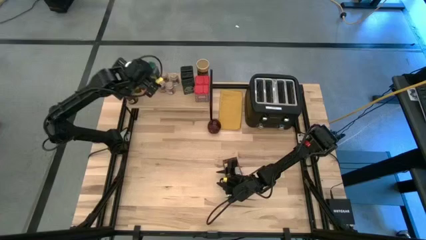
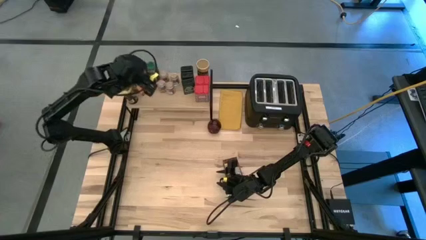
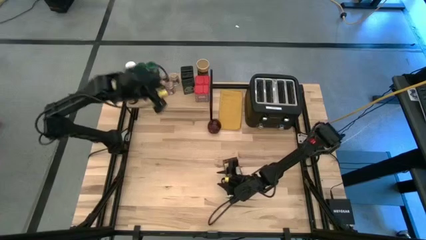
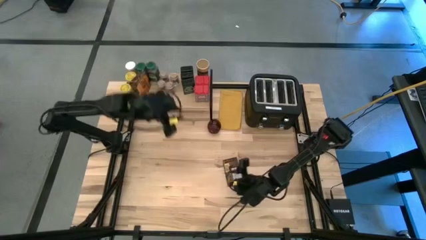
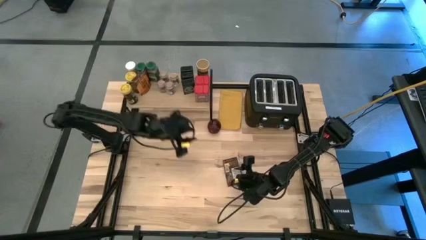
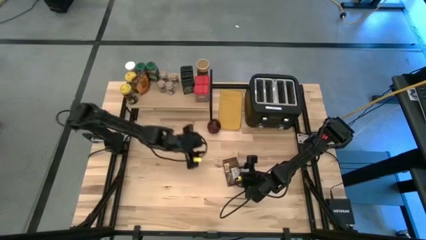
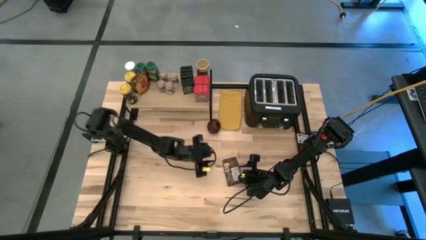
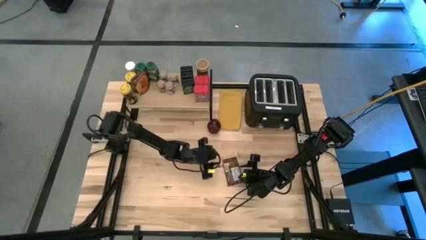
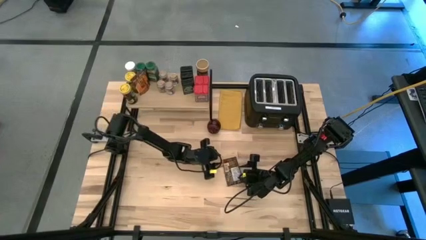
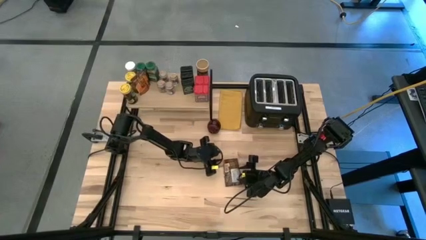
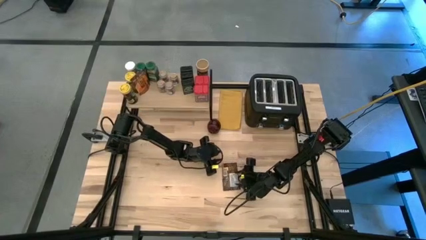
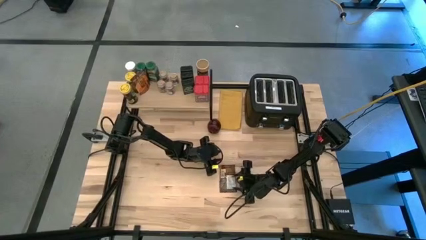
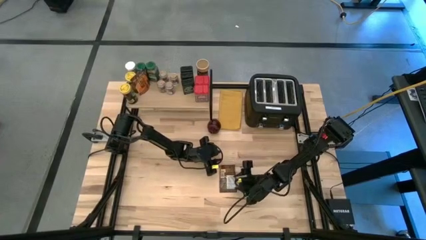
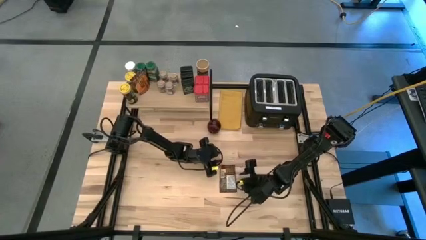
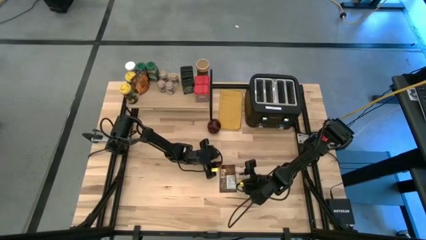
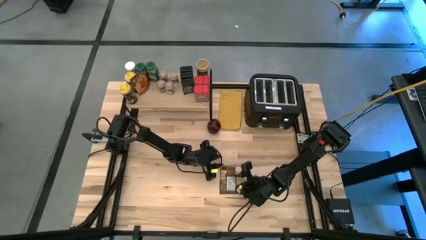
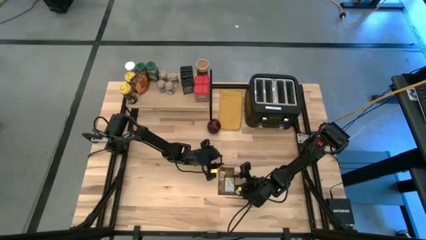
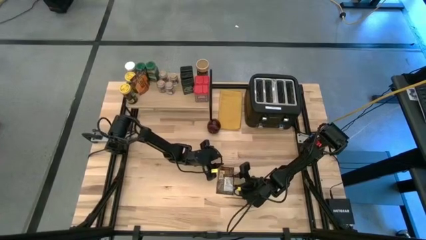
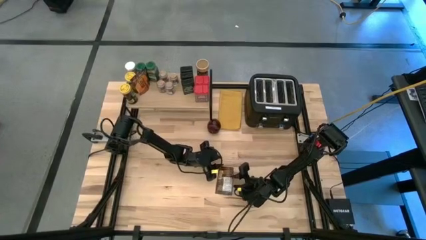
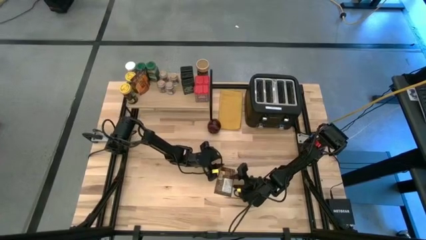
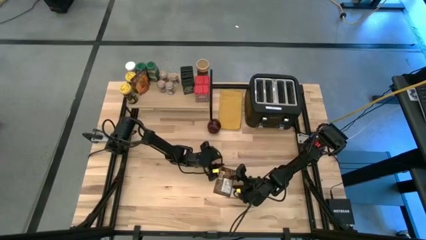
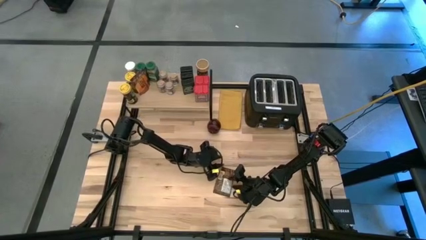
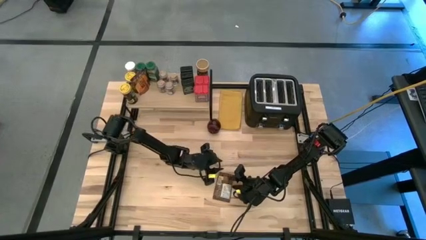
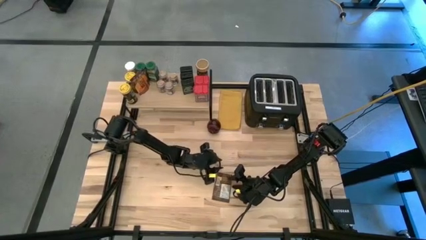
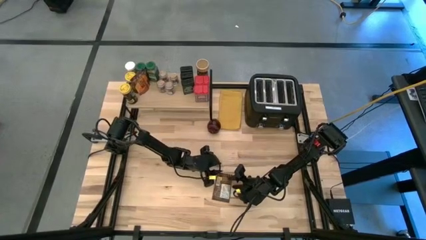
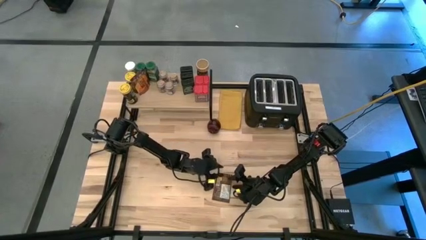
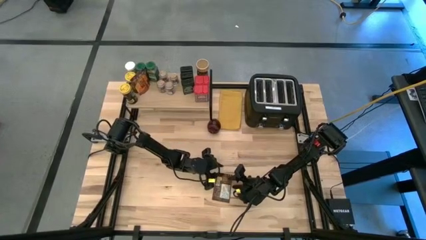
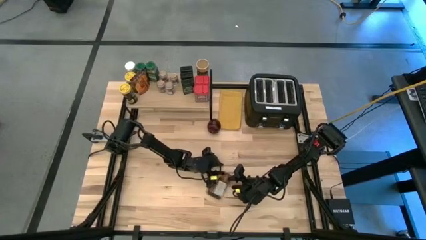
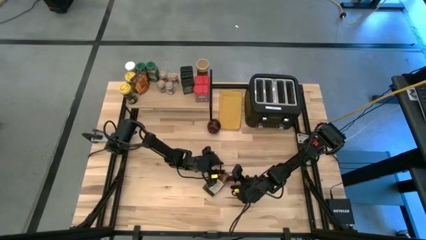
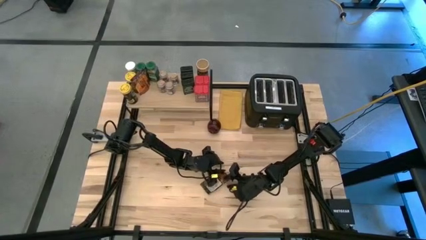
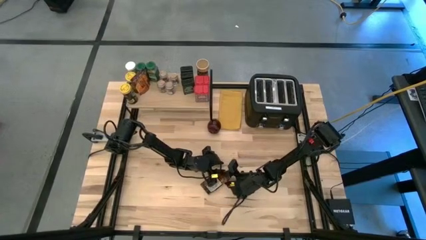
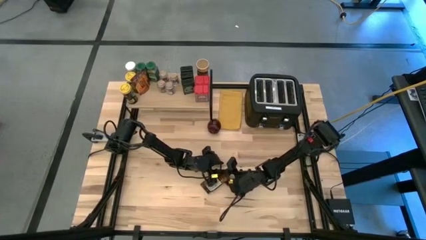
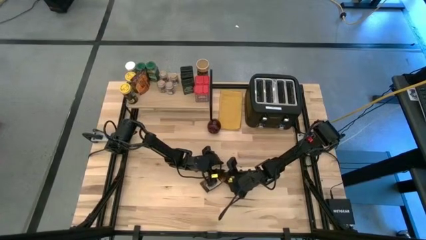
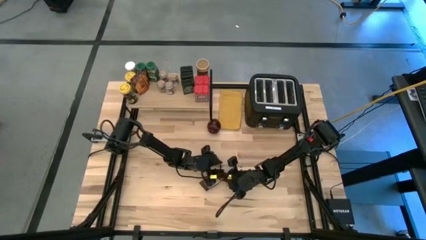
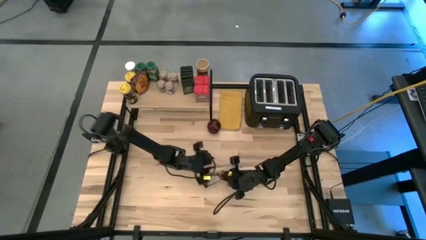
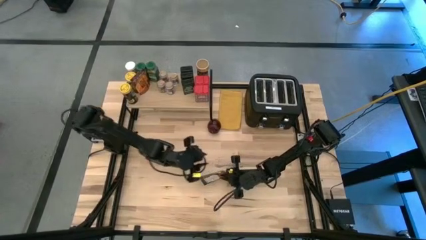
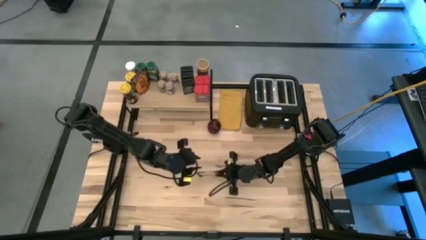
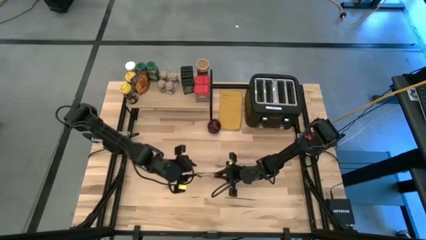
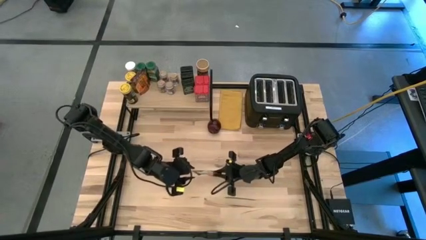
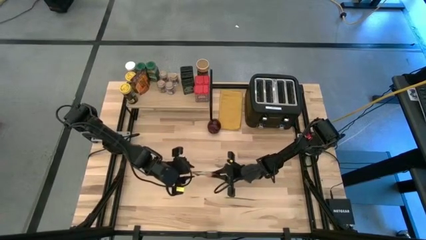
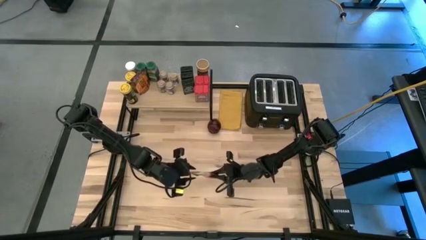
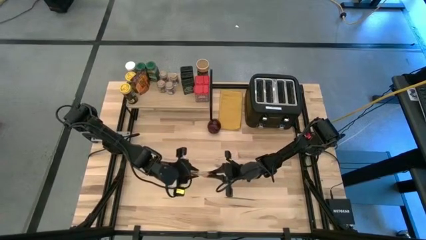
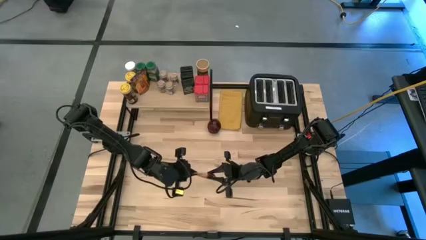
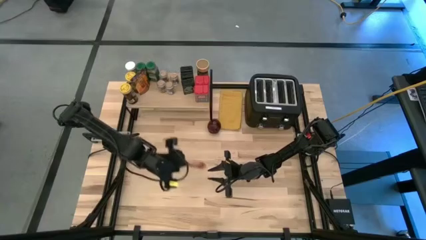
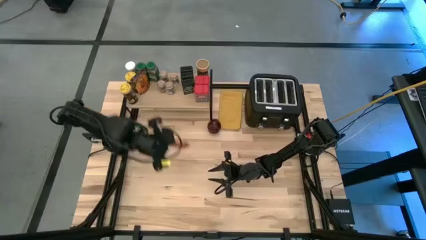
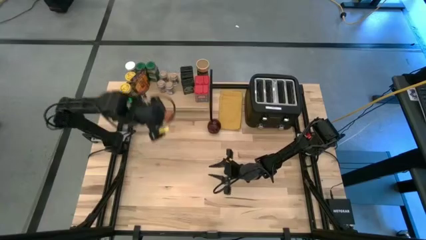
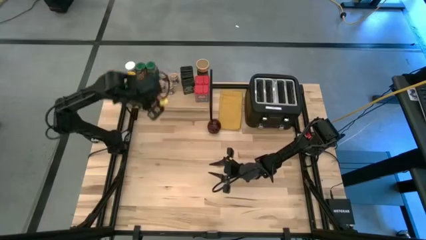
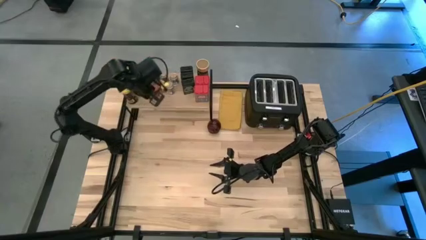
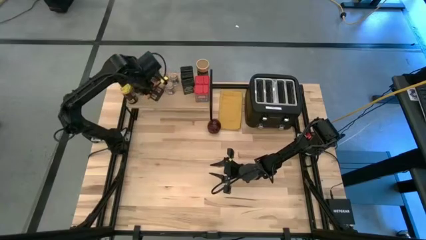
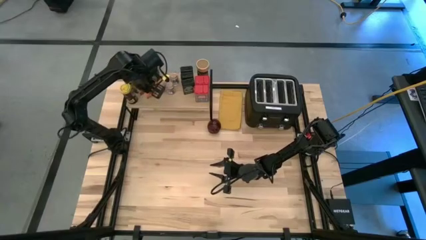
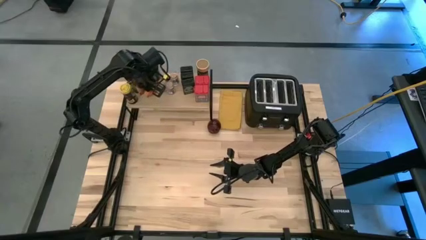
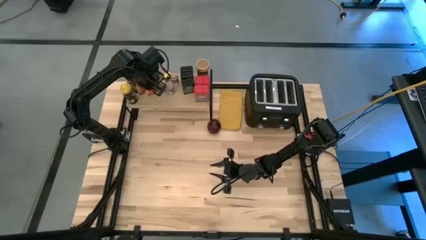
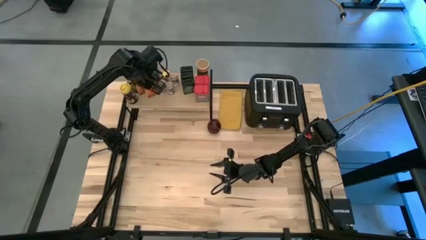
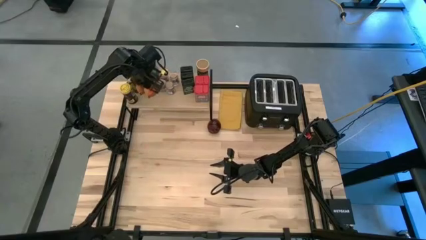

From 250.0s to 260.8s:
Task: Shelf spices
Put the orange seasoning bag aligned with the other orange seasoning bag on the shelf

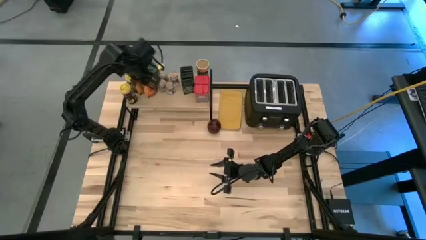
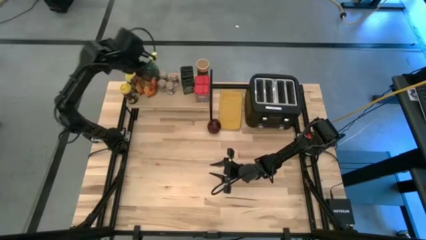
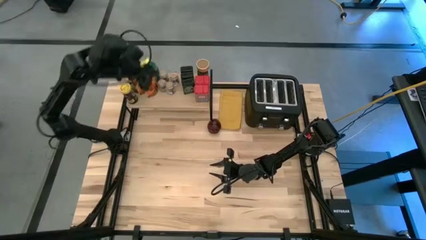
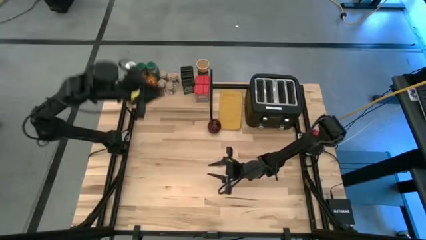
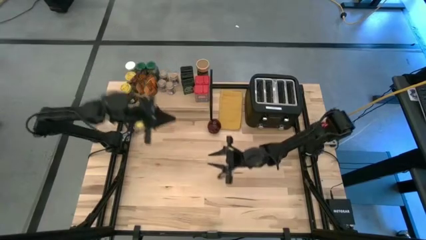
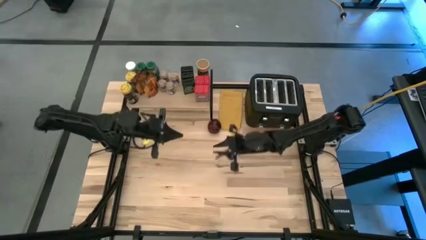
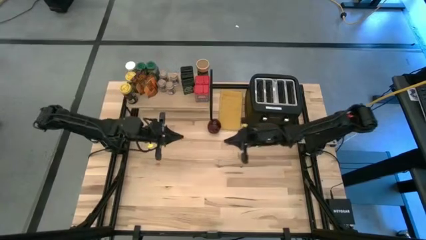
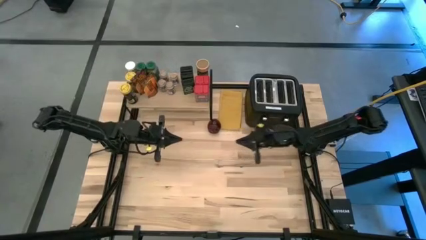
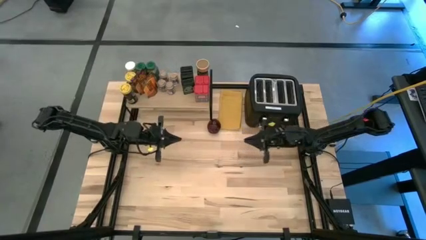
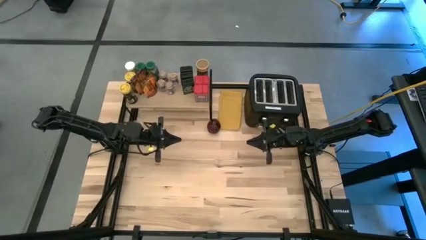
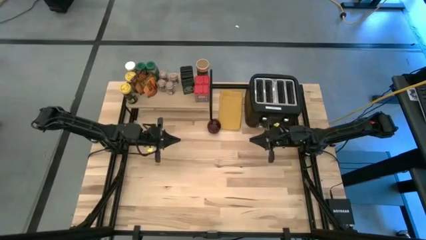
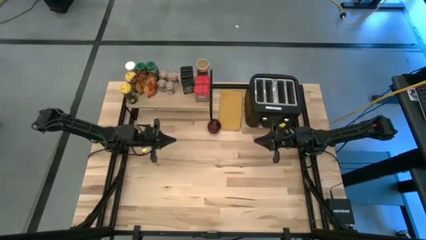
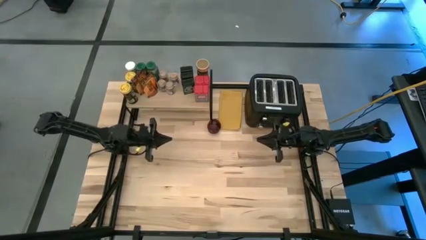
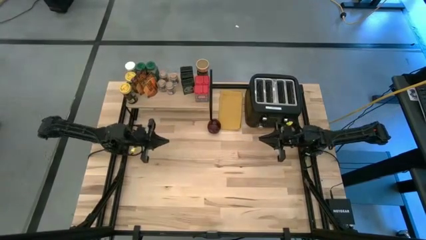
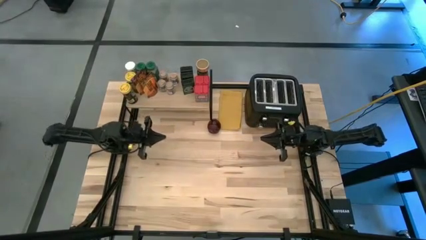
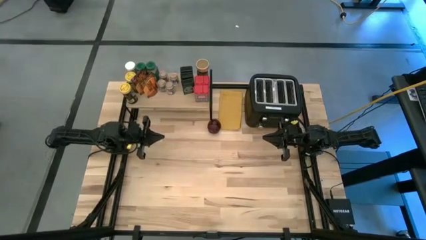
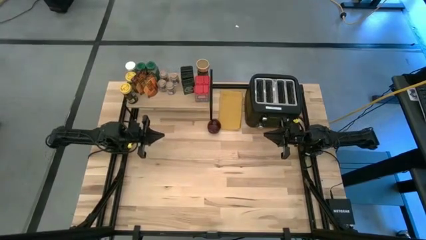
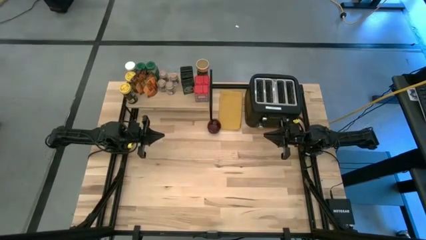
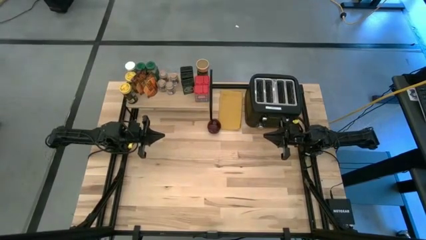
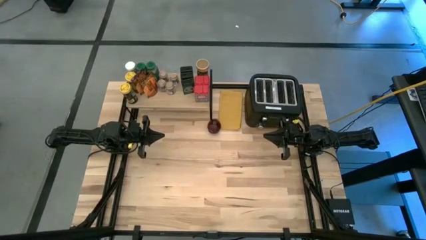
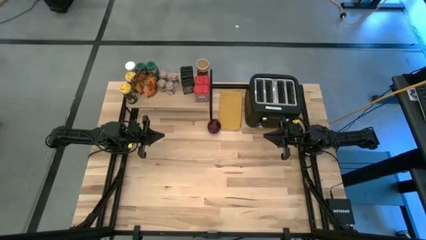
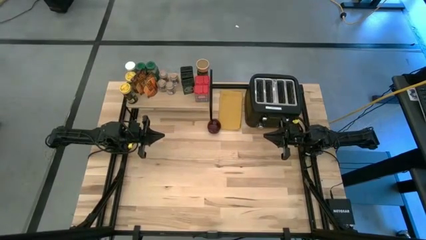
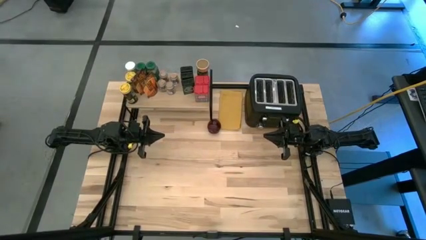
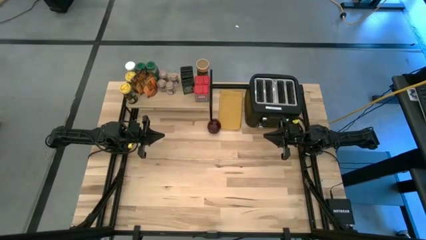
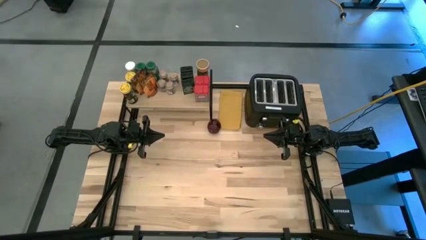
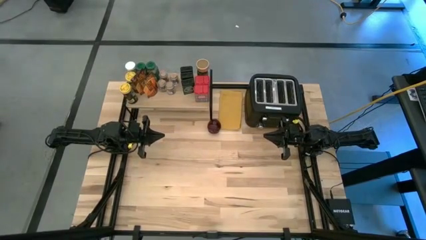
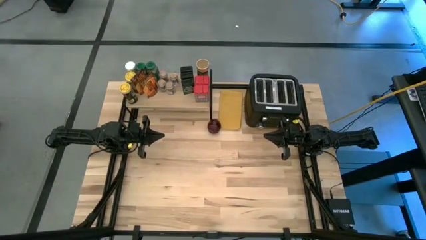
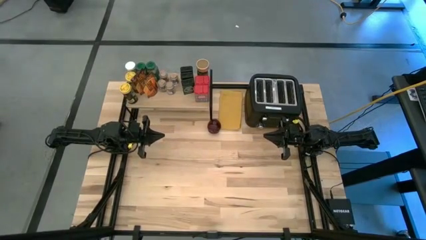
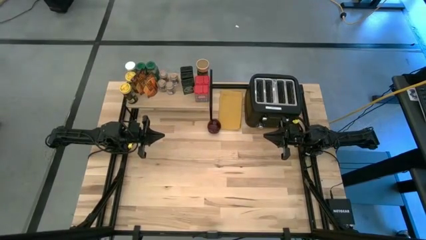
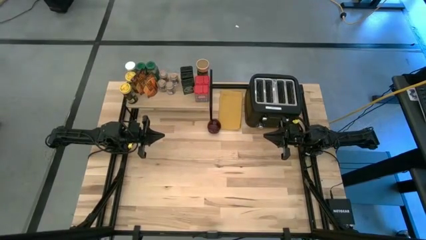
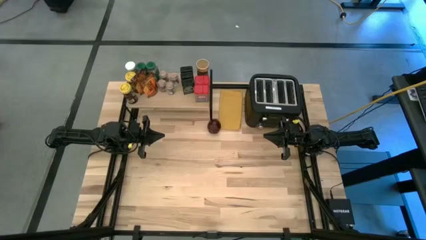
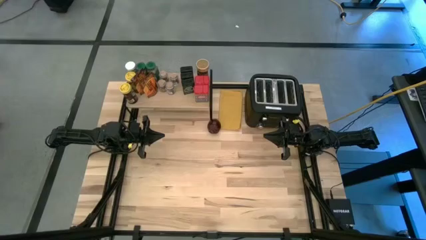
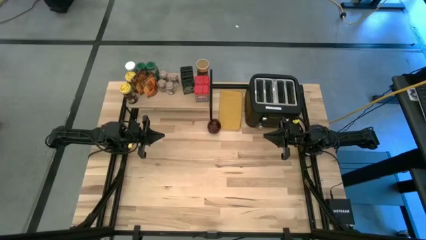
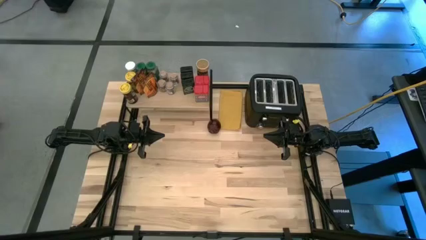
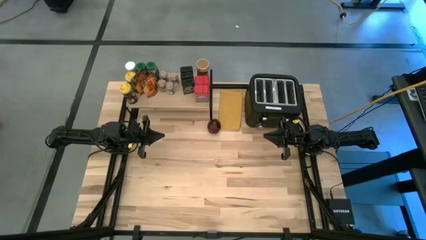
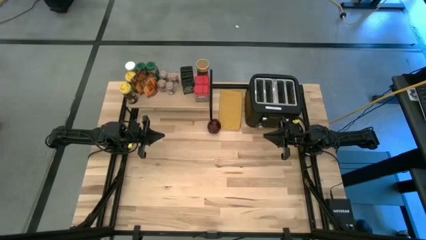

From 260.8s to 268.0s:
Return to Home Position
